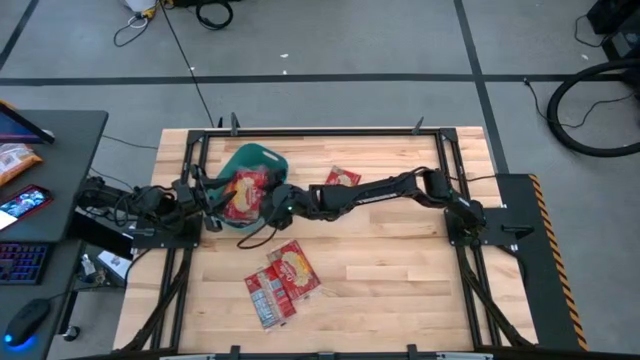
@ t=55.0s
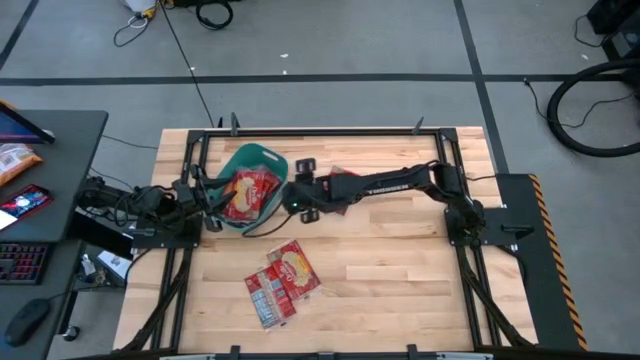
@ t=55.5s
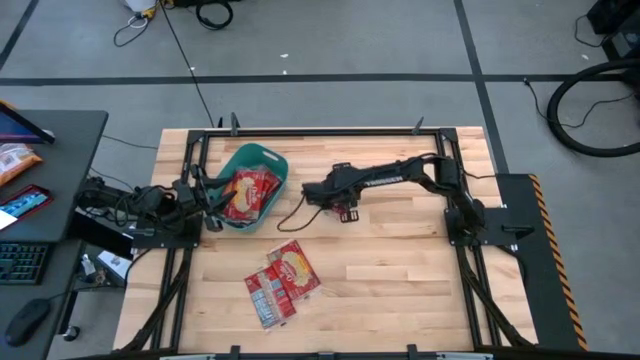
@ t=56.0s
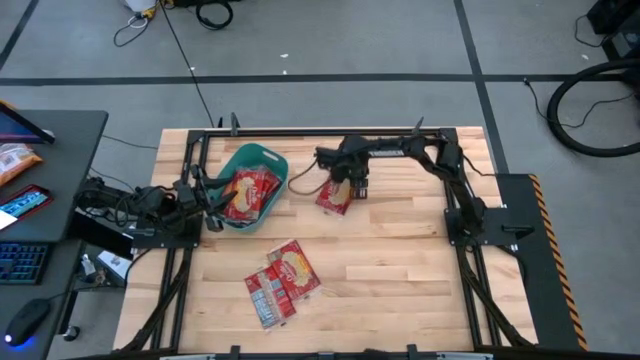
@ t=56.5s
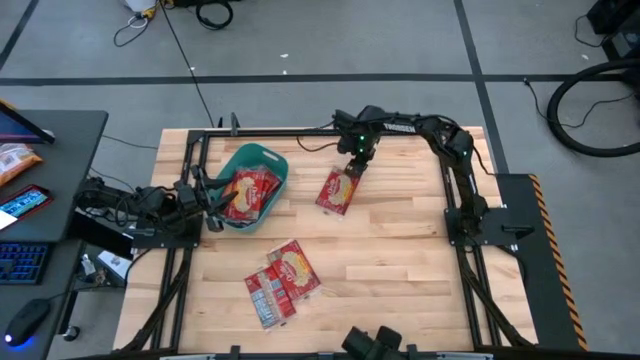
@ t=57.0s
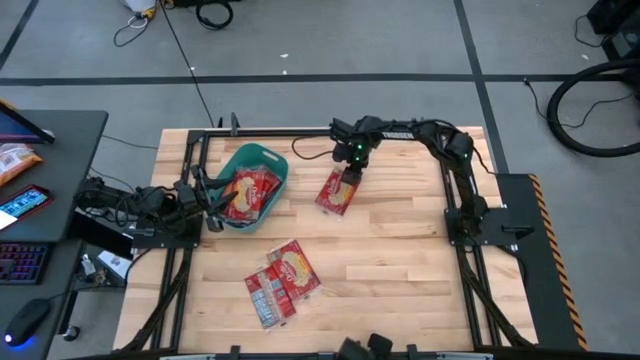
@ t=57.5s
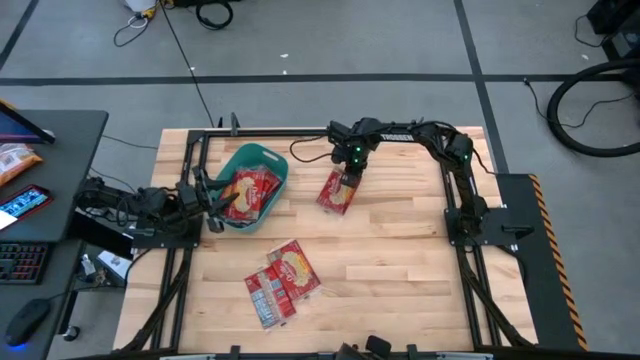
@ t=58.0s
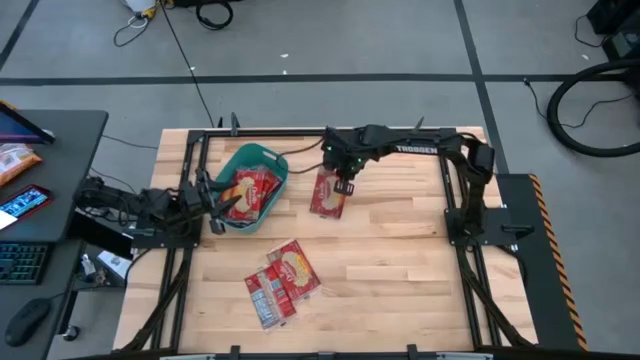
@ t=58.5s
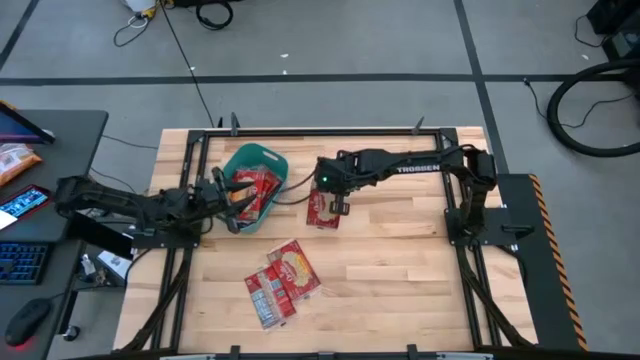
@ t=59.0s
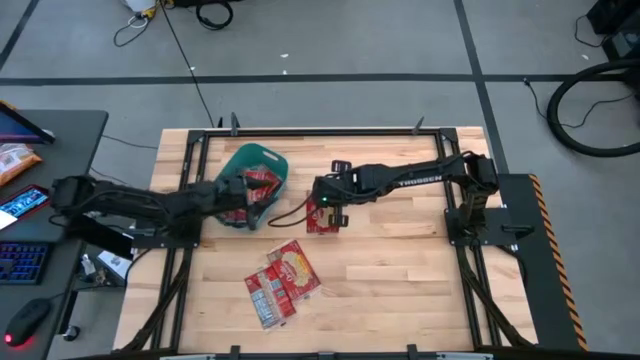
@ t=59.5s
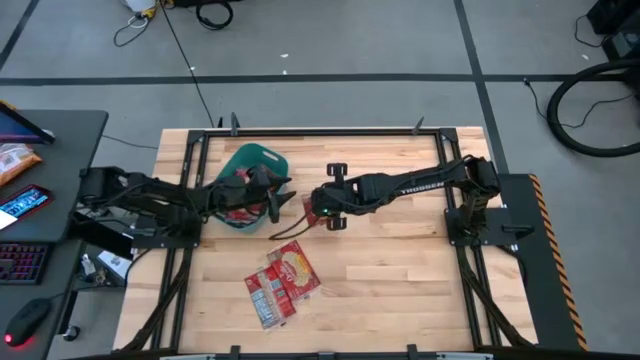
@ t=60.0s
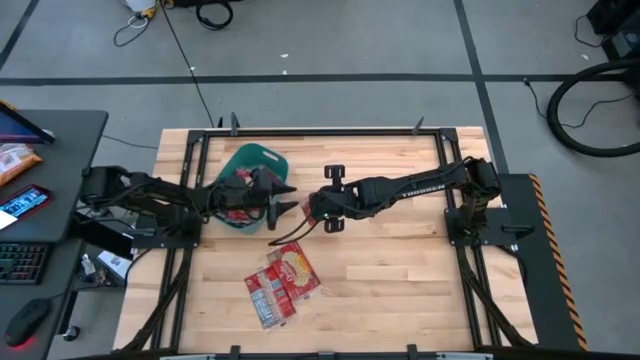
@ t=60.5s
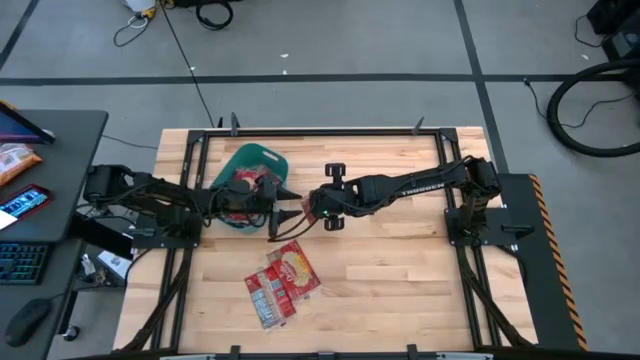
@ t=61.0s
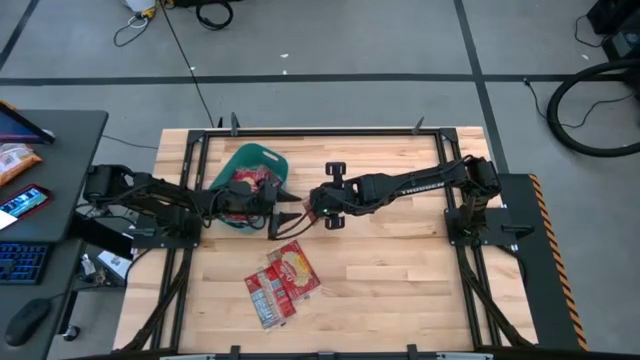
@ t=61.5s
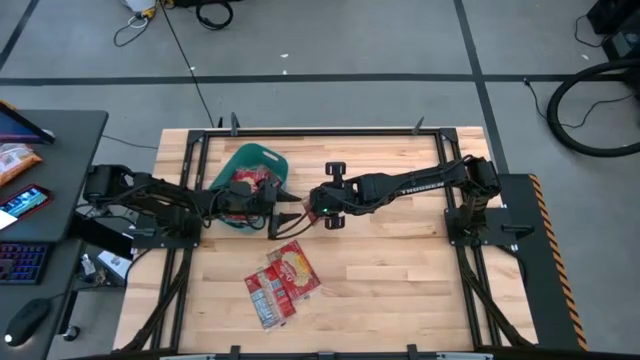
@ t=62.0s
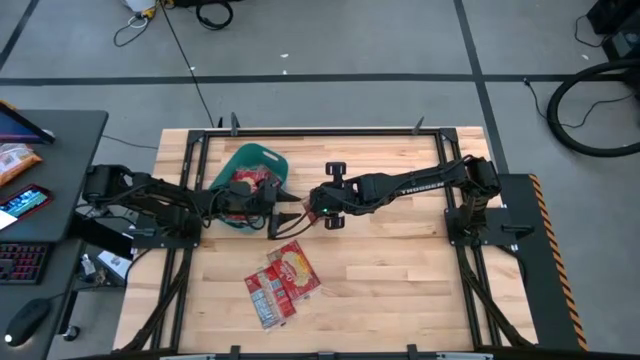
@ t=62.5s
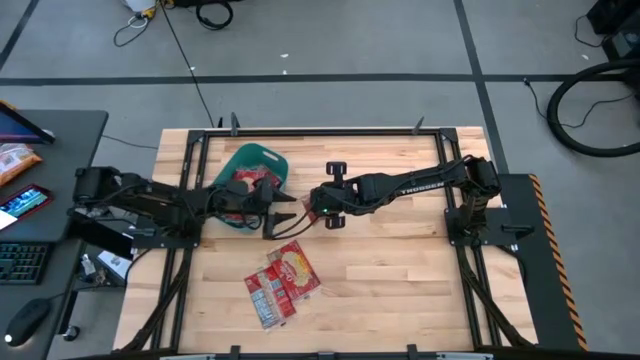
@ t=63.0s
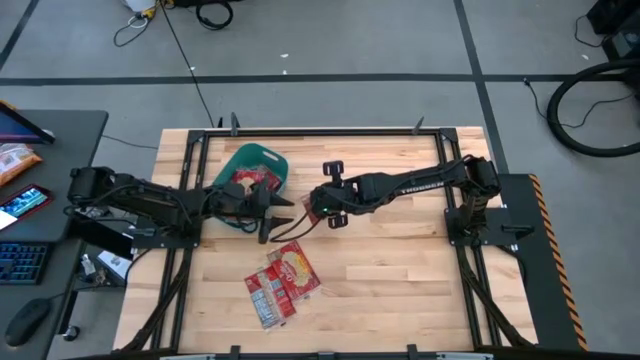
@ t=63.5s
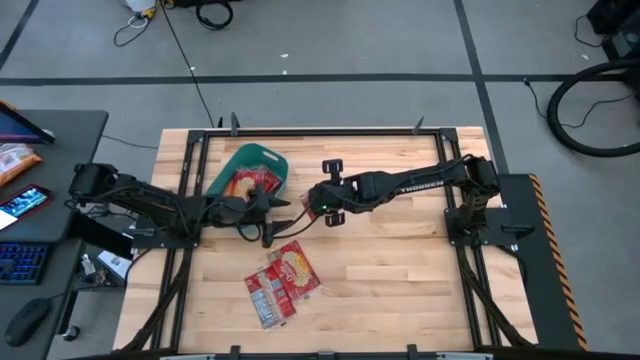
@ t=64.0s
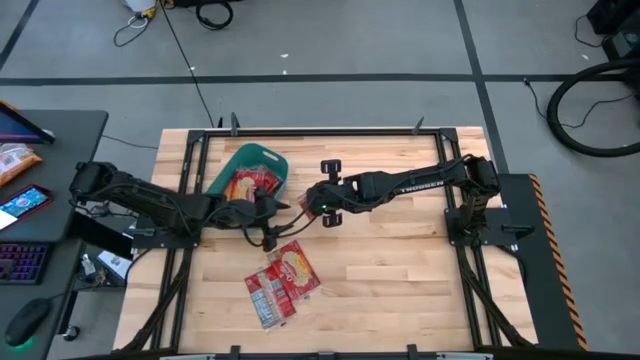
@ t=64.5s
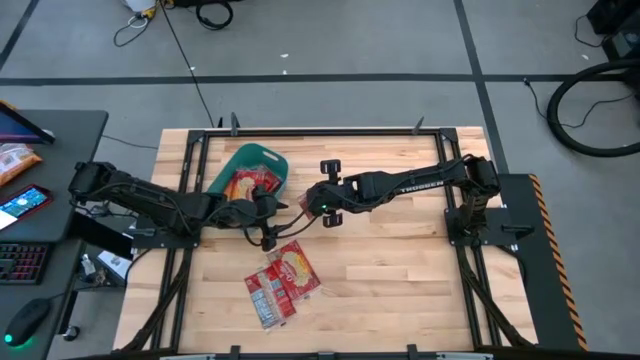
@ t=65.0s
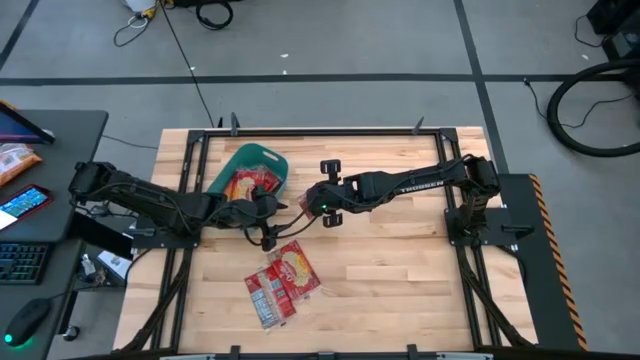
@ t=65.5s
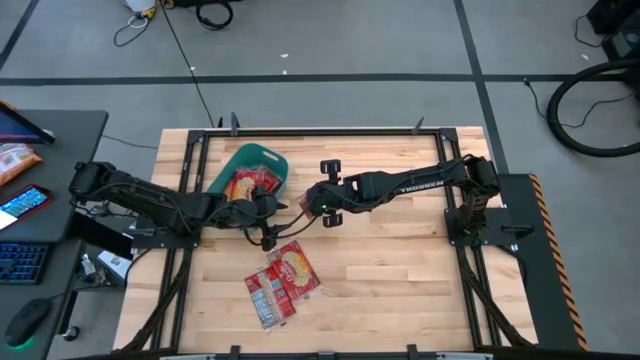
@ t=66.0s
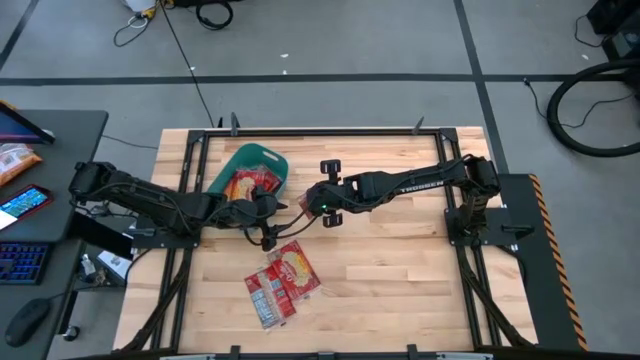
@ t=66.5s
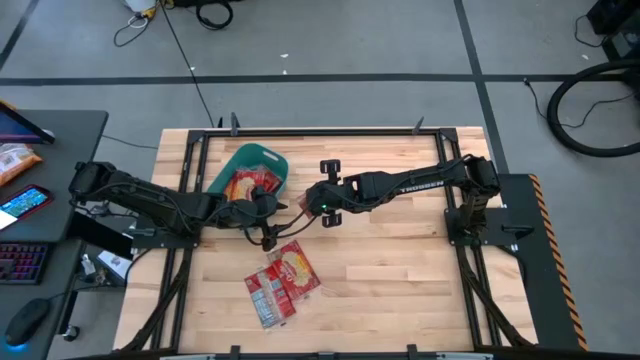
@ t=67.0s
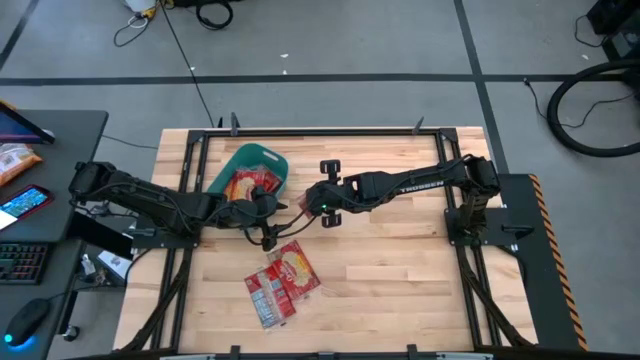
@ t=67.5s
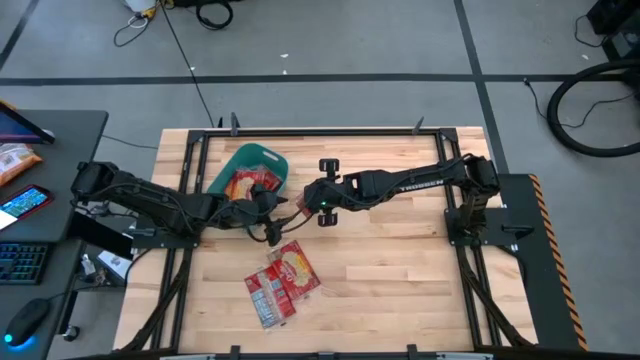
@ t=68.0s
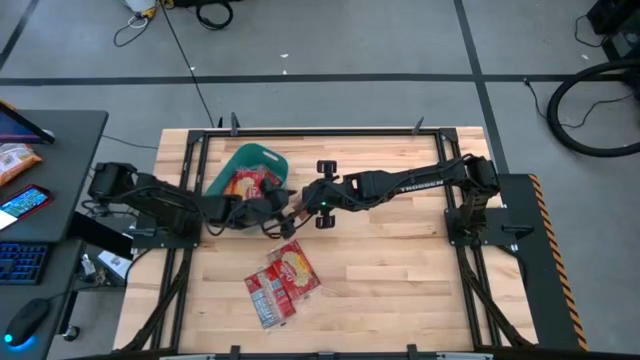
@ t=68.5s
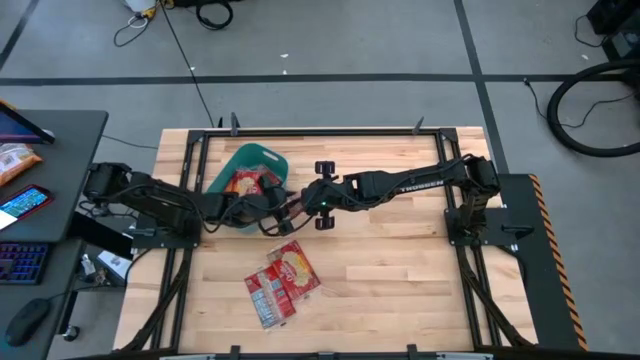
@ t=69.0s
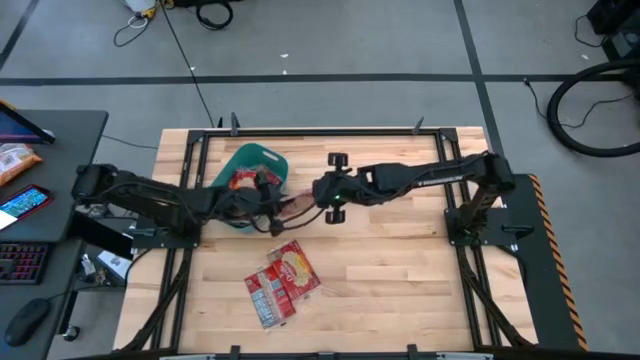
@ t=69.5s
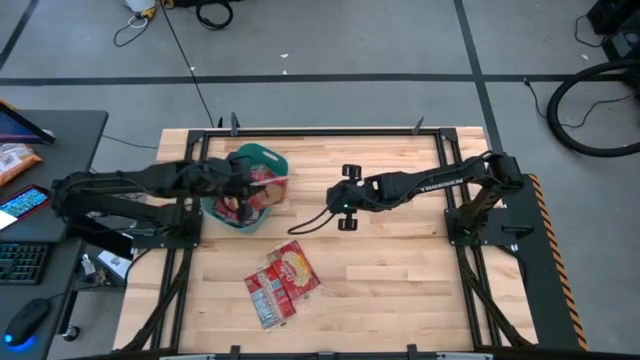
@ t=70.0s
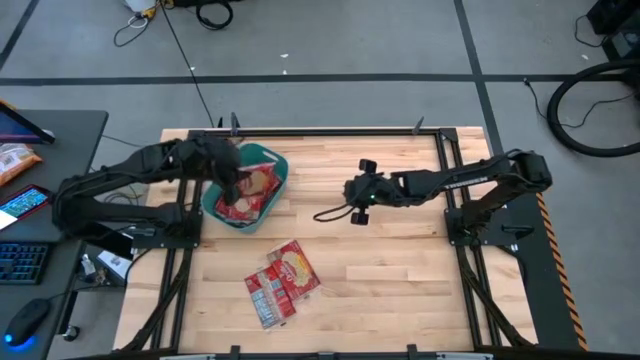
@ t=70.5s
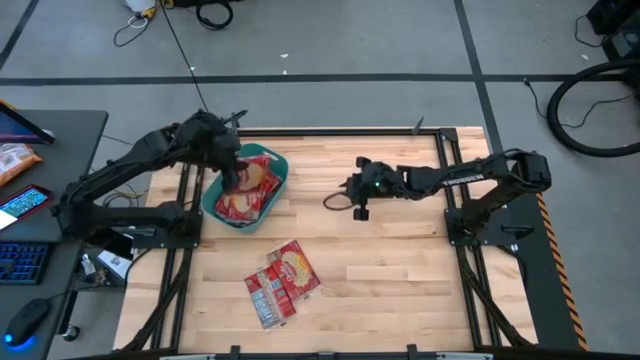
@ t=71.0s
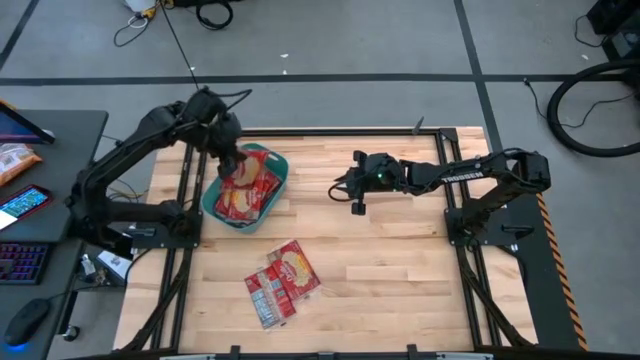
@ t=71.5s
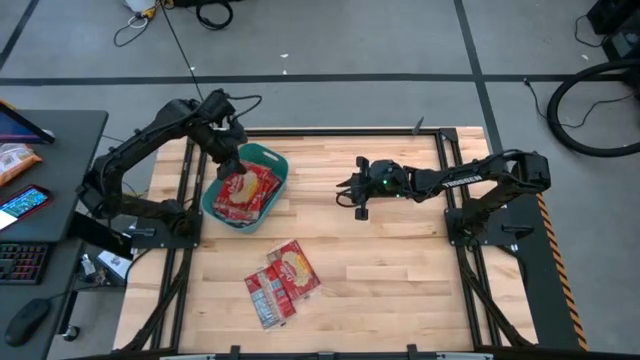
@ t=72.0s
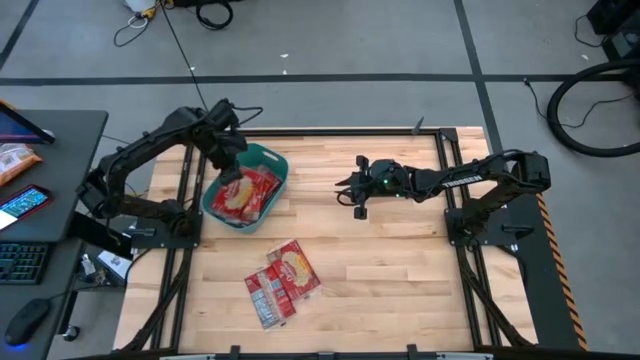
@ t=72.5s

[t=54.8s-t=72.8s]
Task: Sort popcorn bags into baskets
Put the red popcorn bag into the green bin
